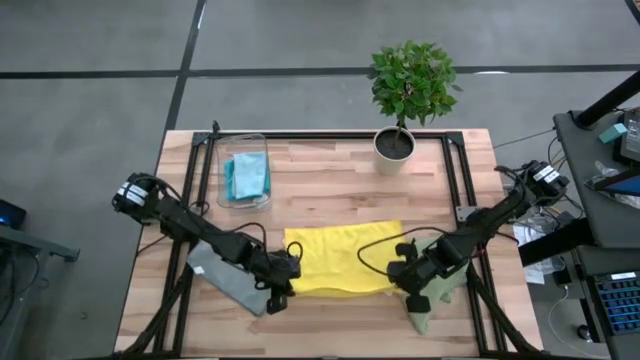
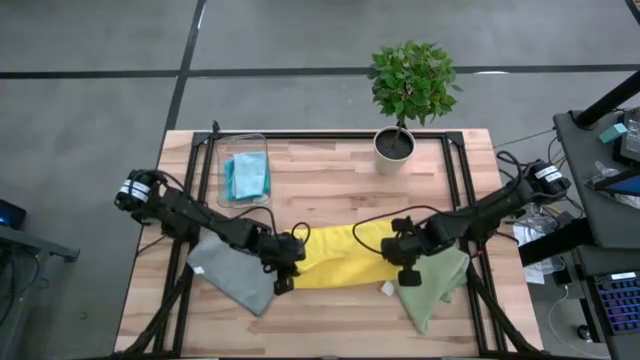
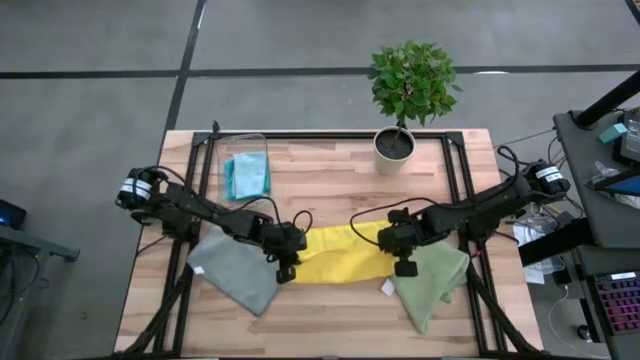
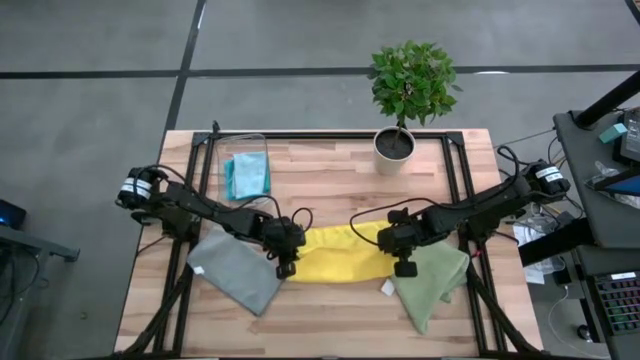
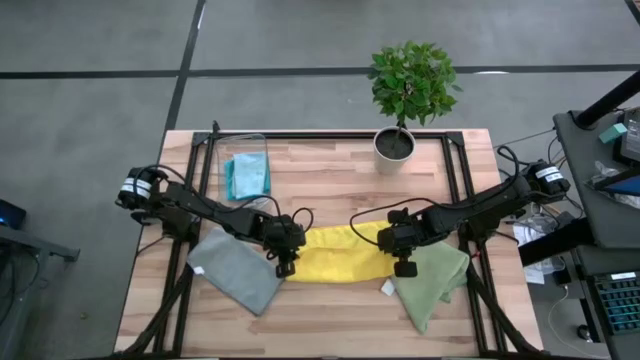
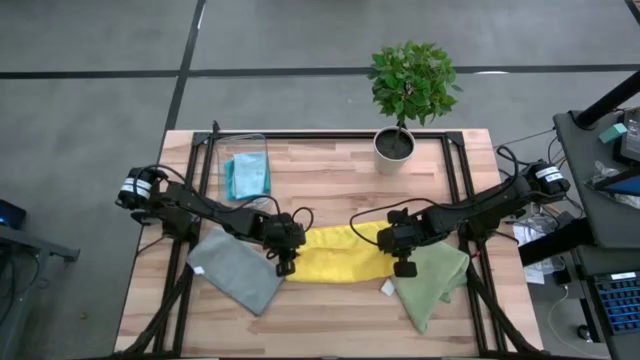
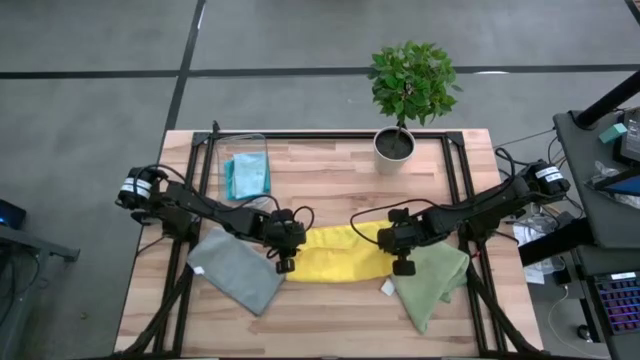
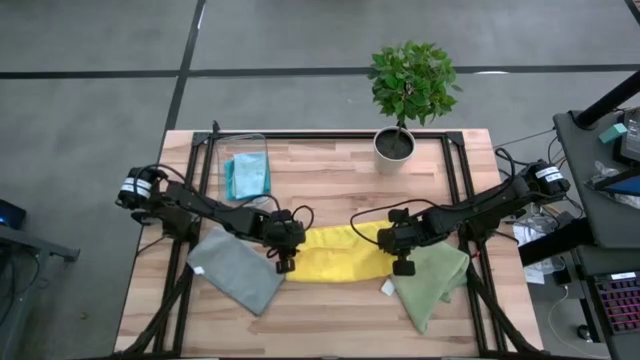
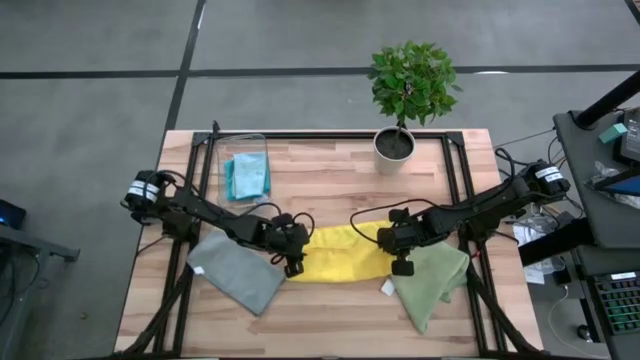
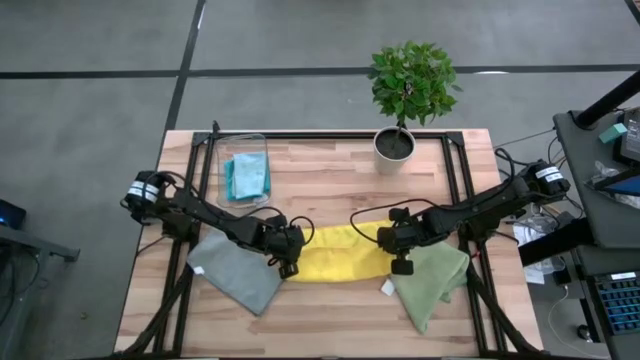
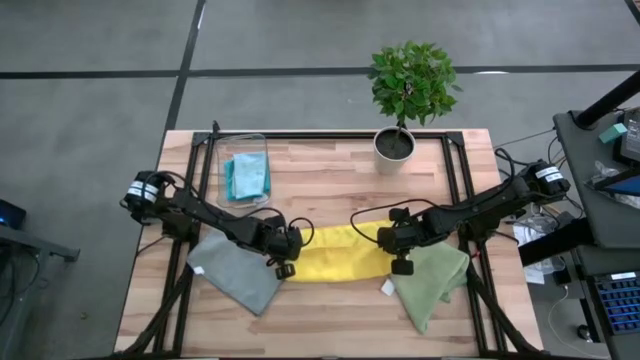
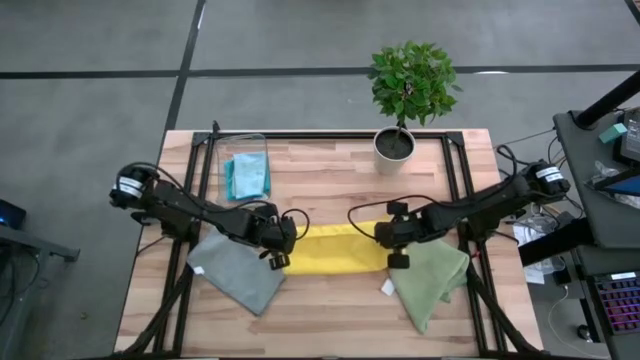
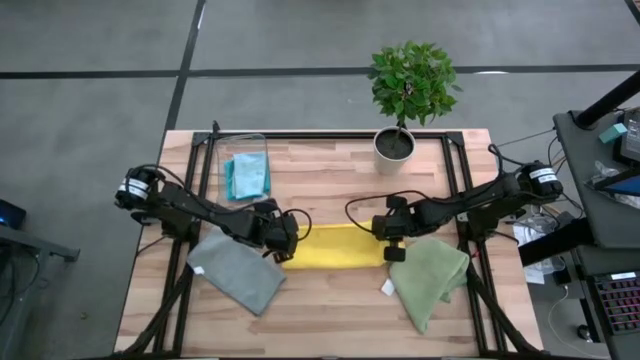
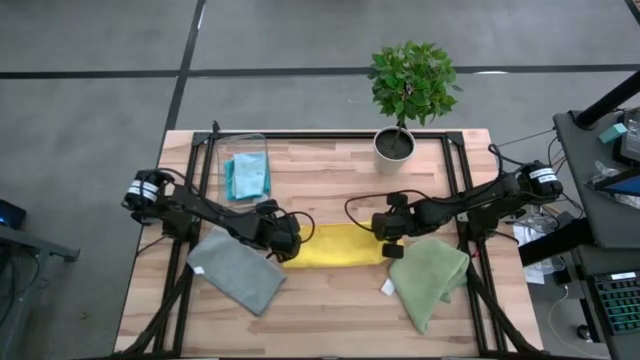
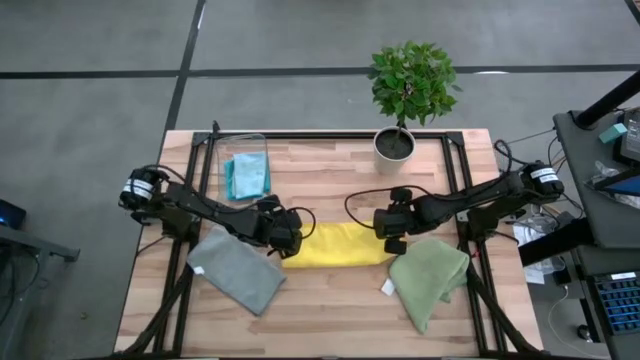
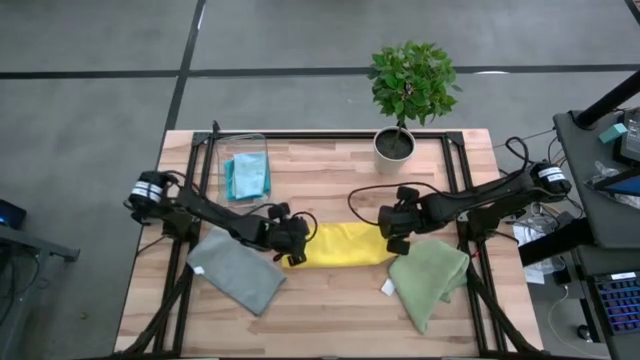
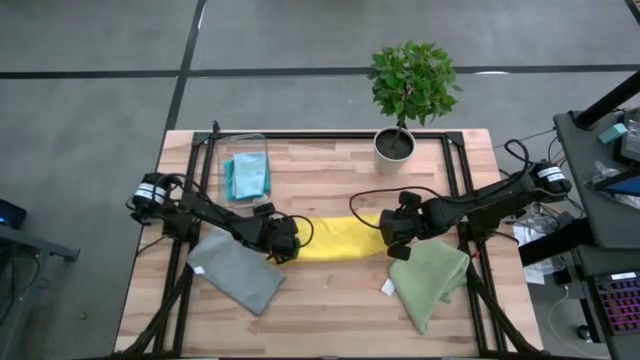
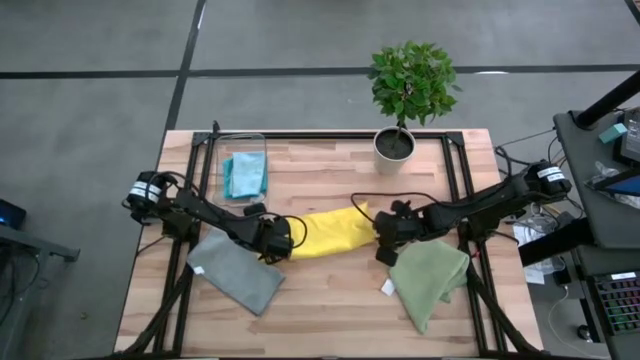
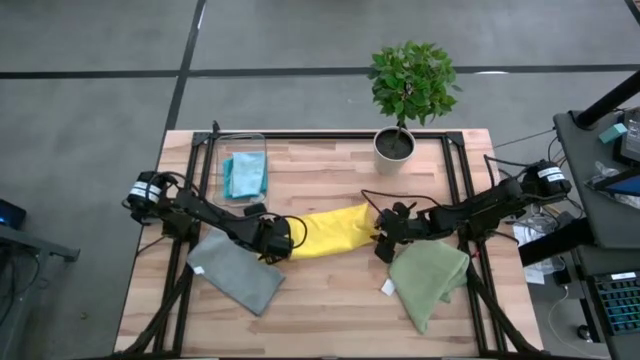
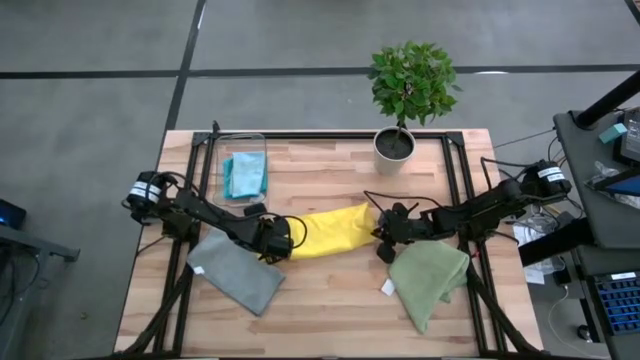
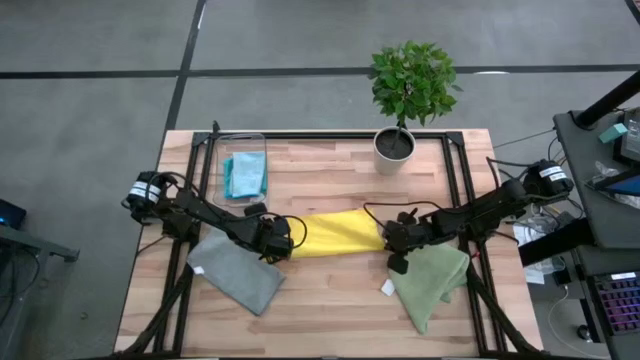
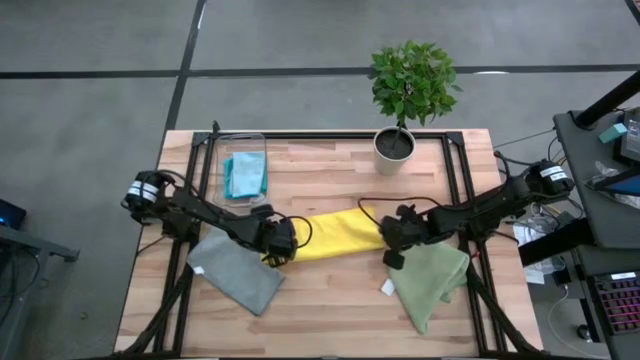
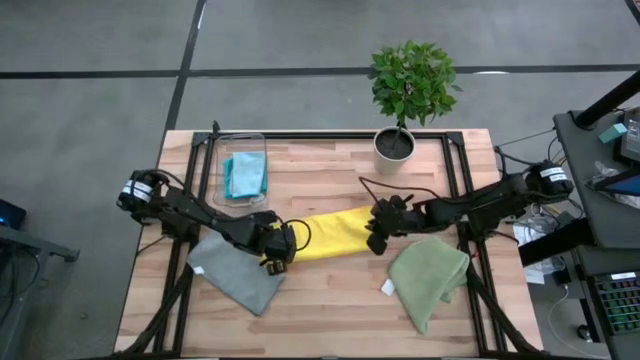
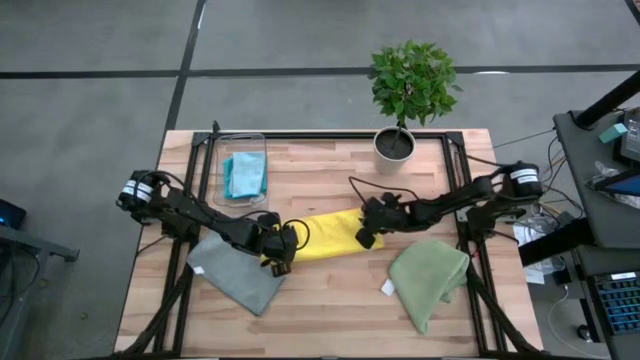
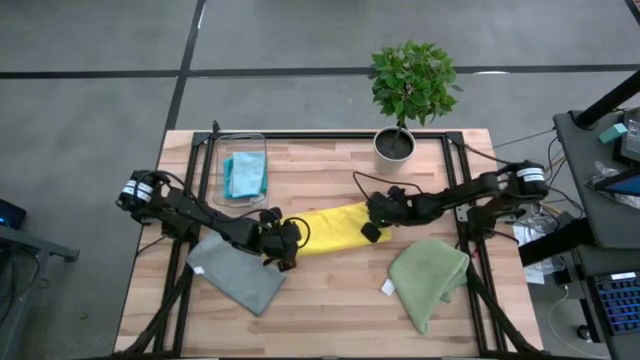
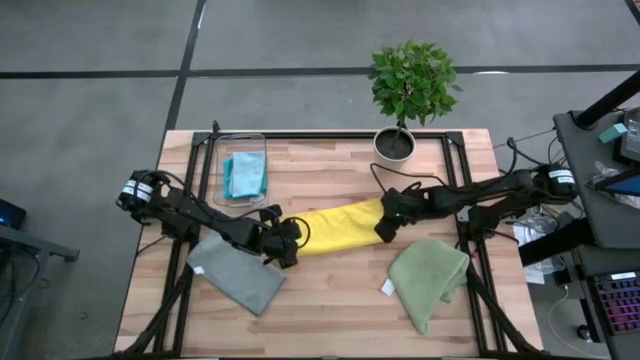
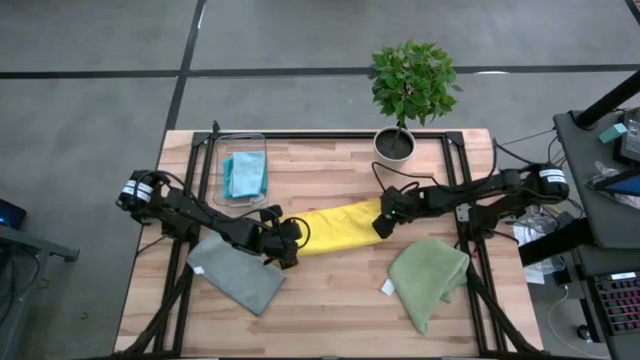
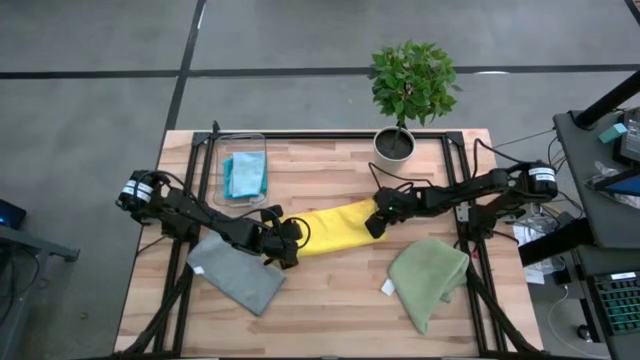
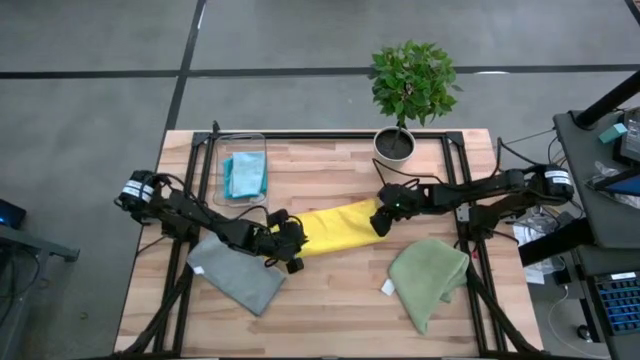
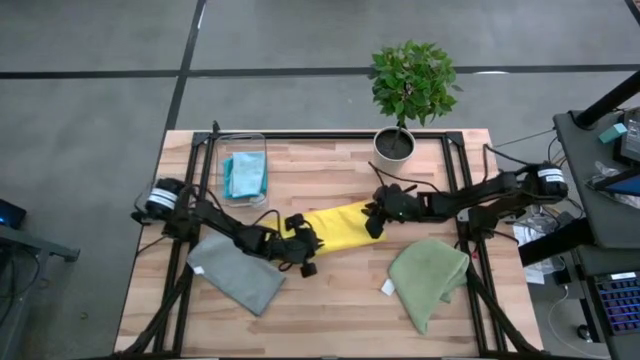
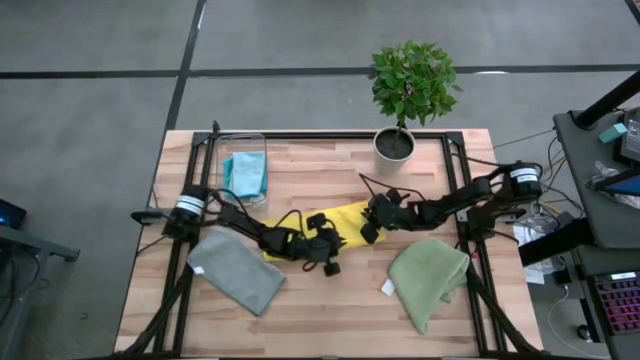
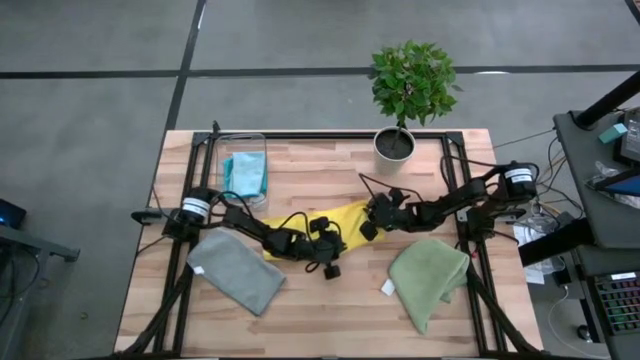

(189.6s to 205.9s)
Task: Fold microfiber towels
Fold the yellow microfiber towel

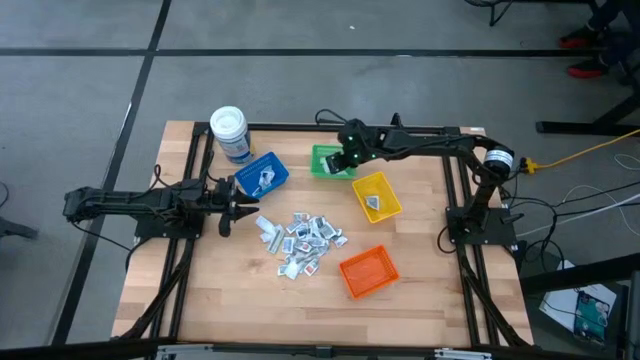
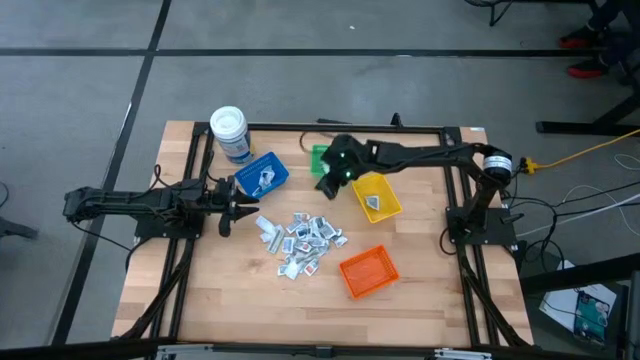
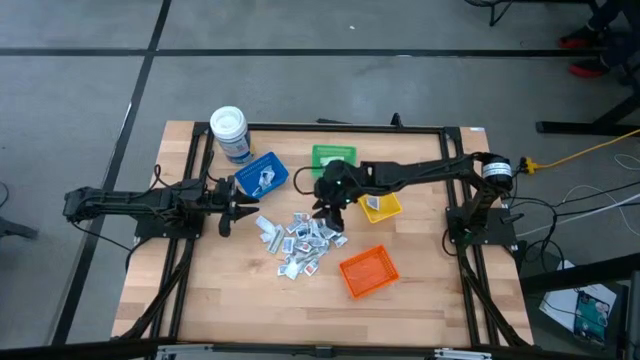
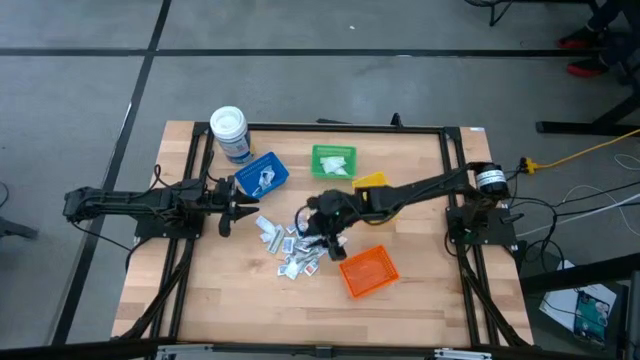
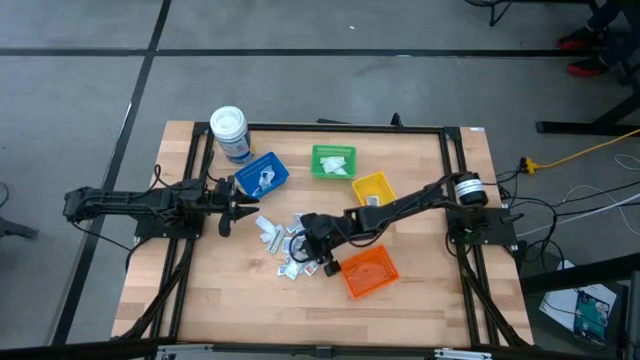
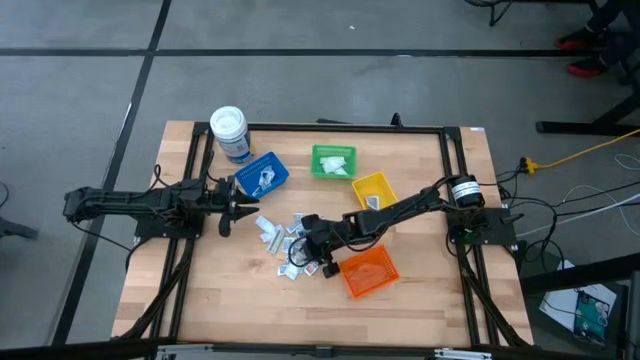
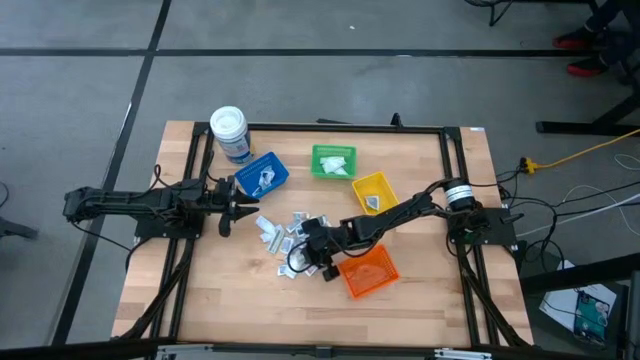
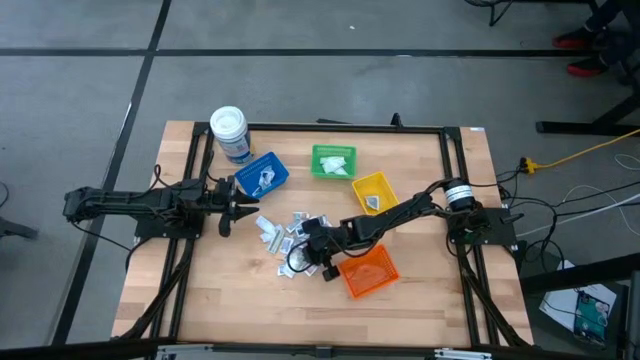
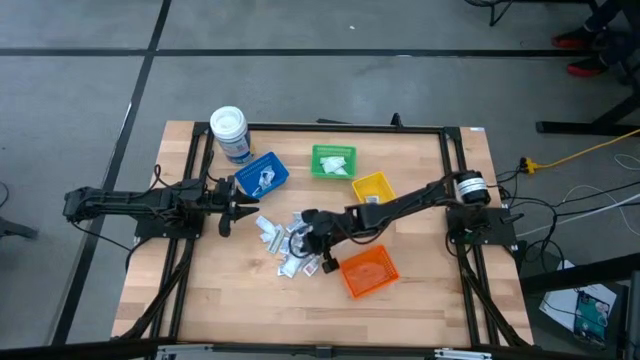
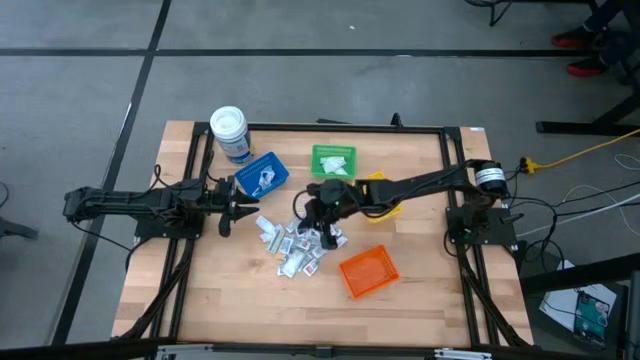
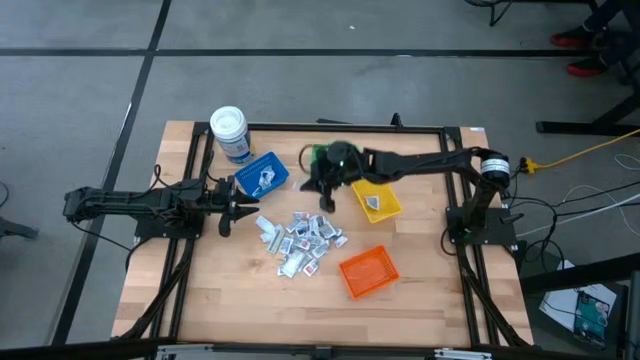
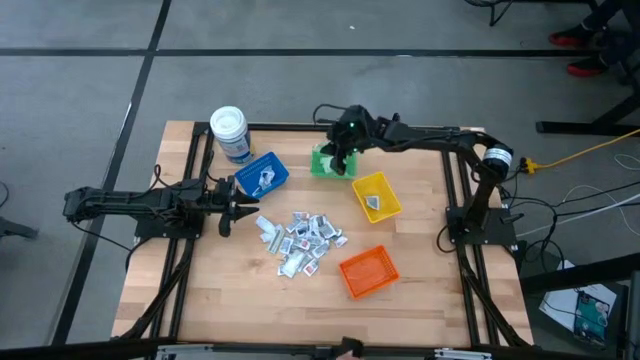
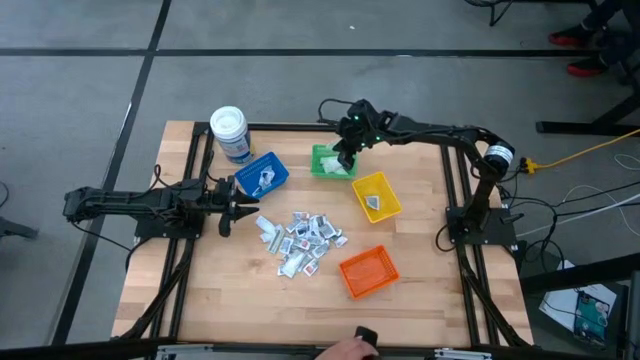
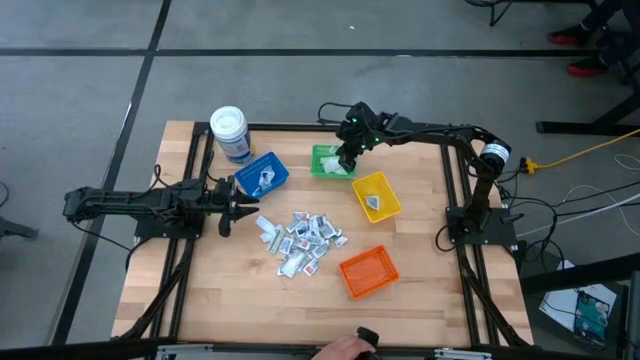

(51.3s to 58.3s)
Task: Pick & Place First Aid Supplies
Put the white bandage into the green bin
